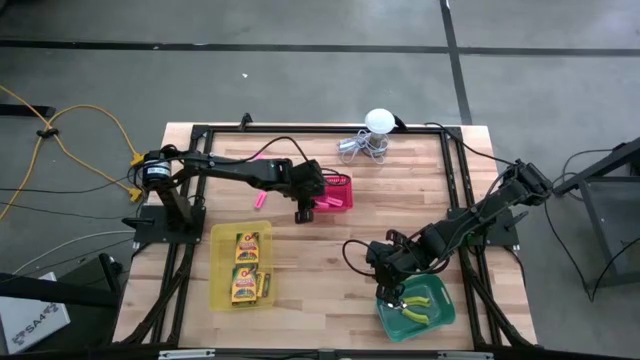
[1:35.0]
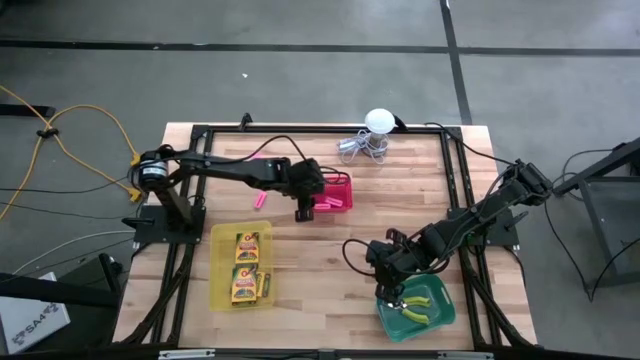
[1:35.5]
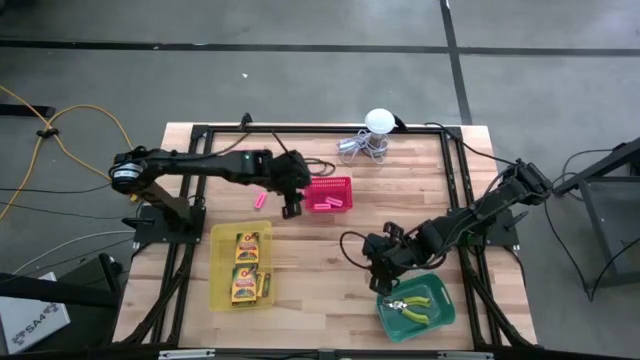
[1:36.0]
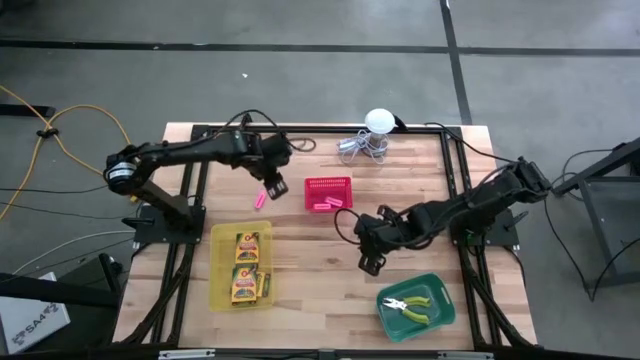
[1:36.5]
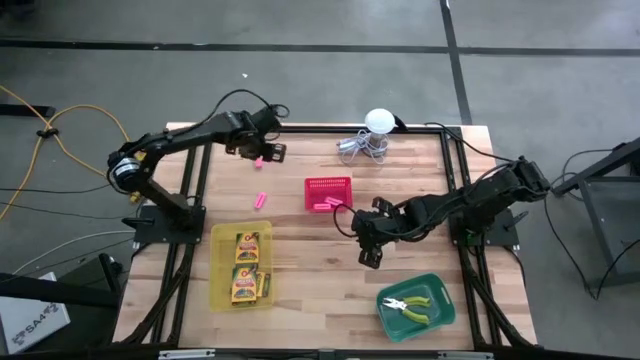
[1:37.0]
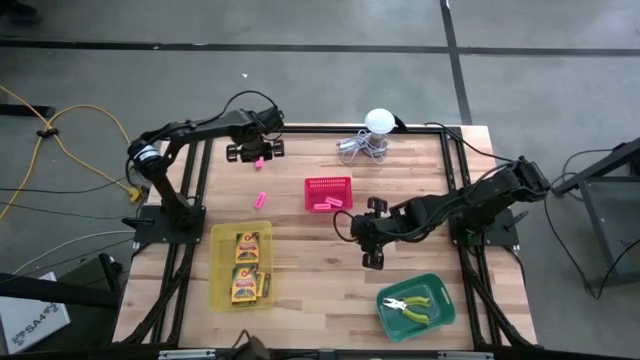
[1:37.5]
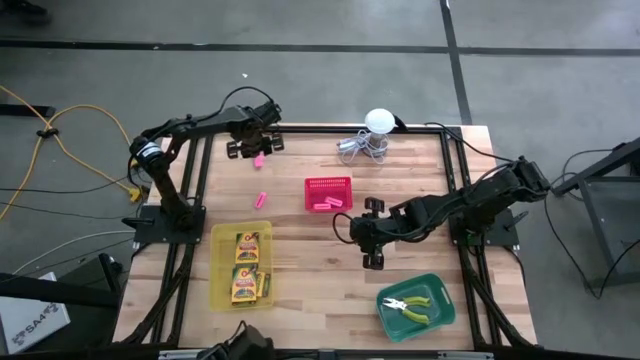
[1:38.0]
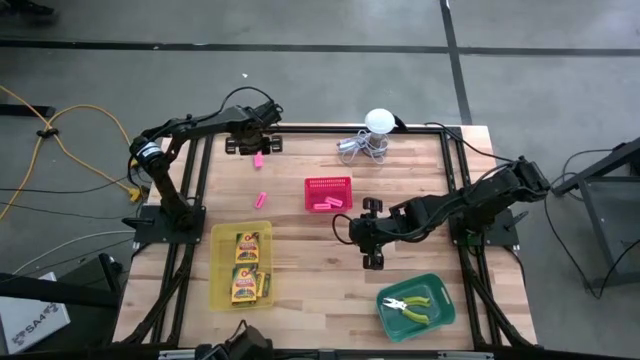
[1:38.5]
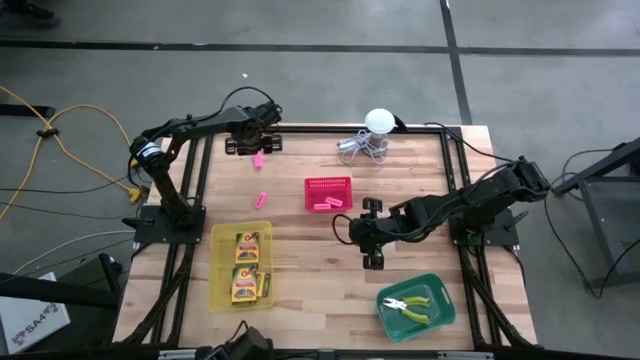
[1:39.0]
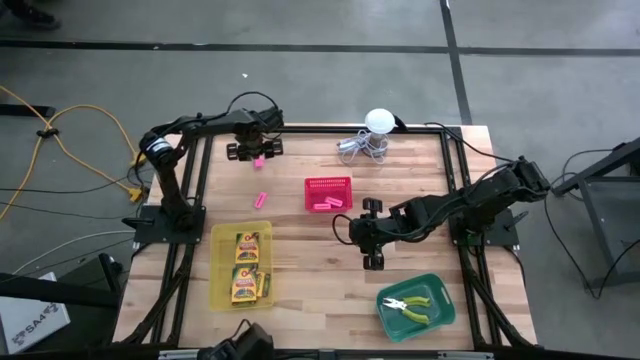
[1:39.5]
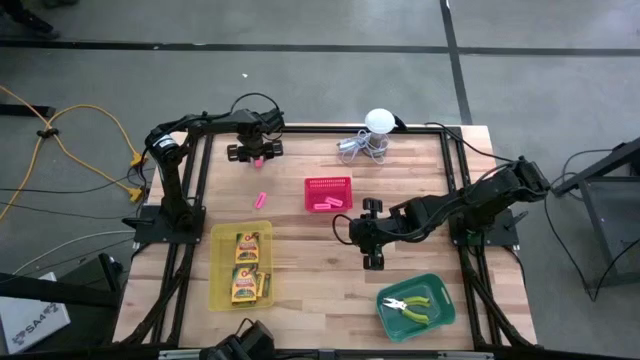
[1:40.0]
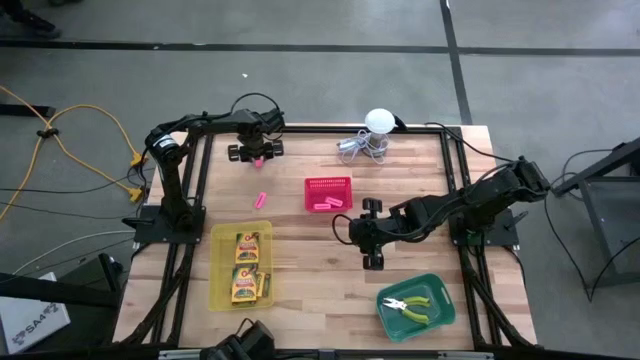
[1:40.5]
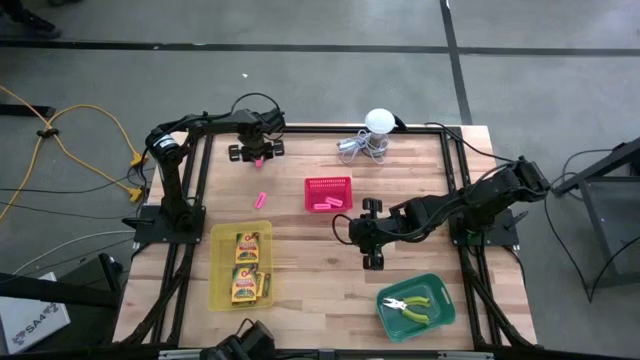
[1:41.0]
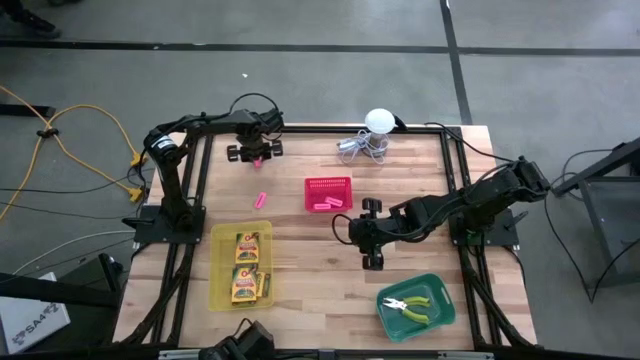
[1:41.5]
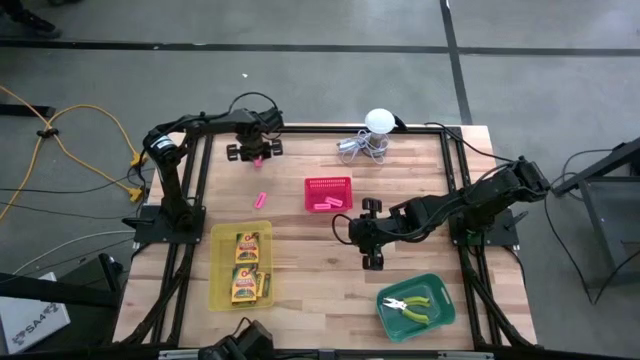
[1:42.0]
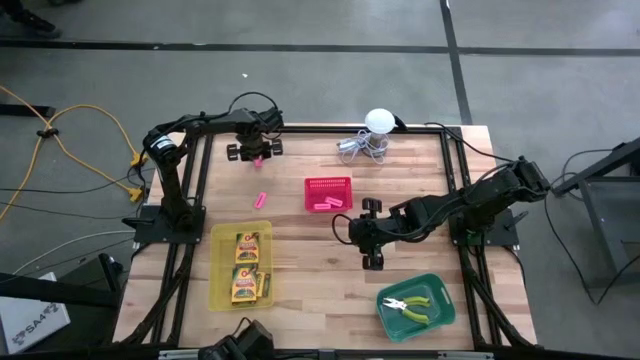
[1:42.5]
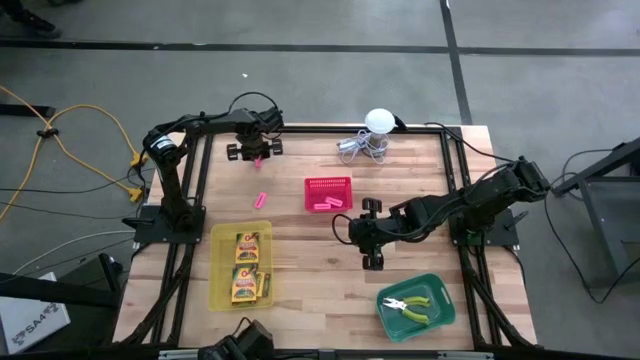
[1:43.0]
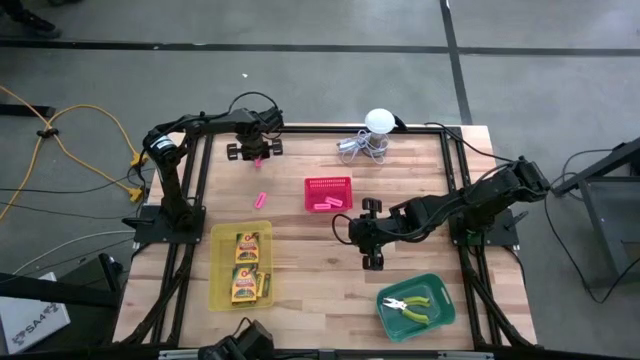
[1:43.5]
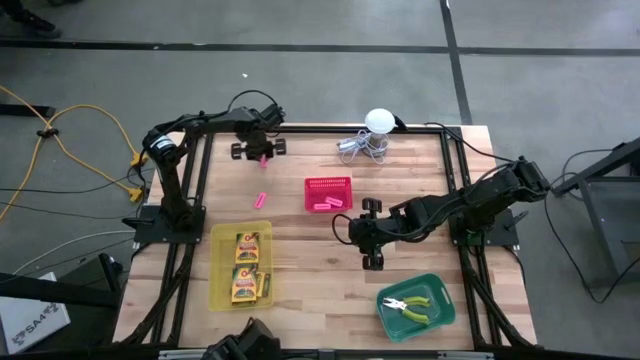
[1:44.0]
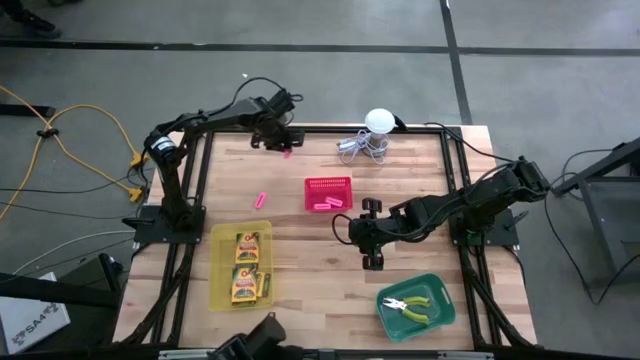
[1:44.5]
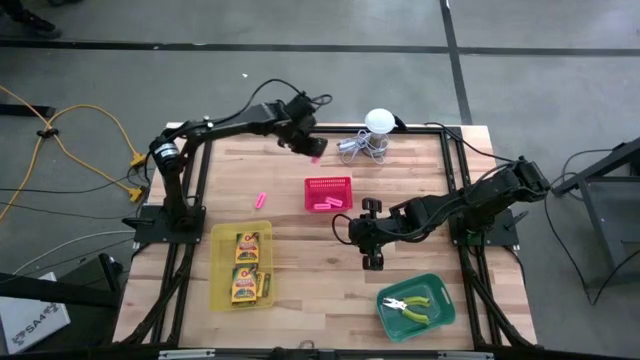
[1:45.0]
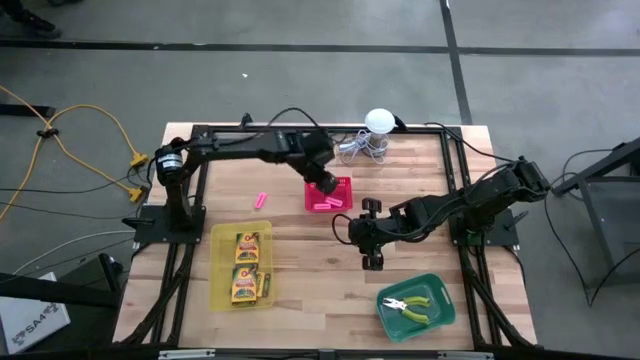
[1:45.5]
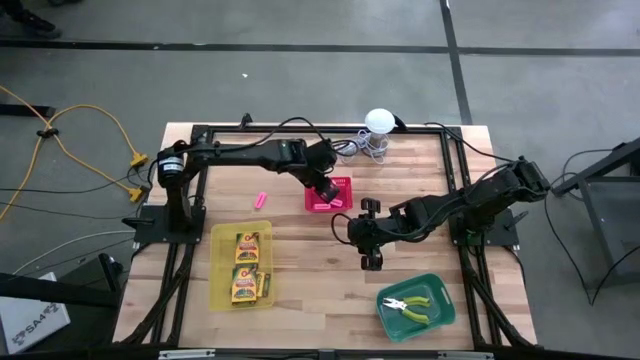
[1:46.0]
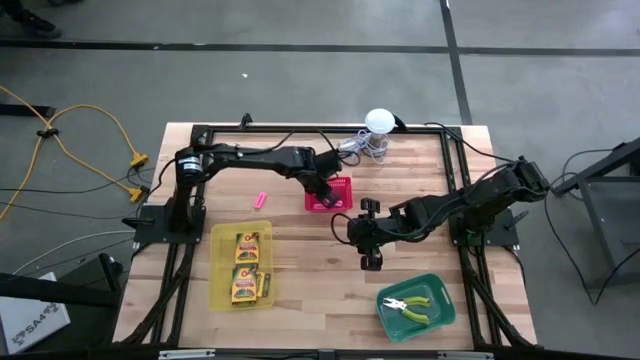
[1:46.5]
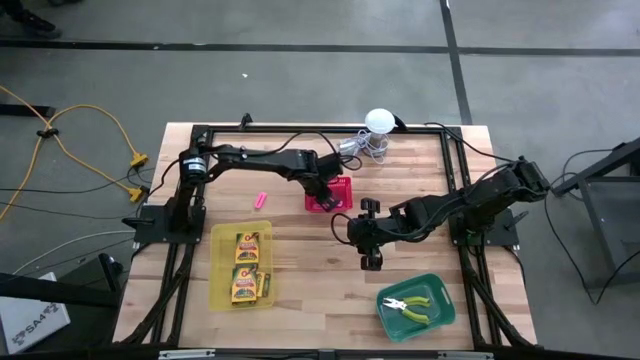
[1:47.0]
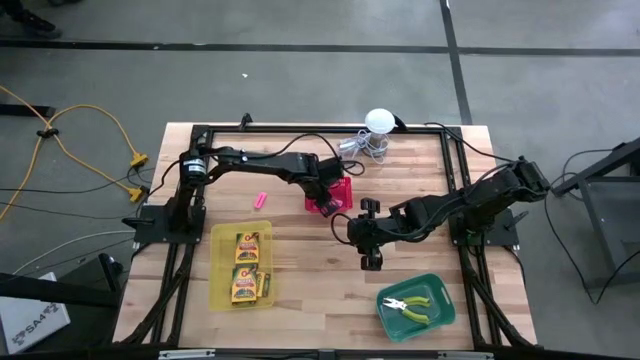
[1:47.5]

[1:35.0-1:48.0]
Task: Pick & Place School Supplies
Put the pink eraser into the red bin

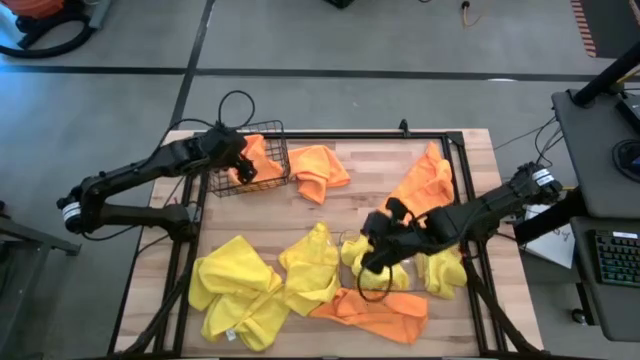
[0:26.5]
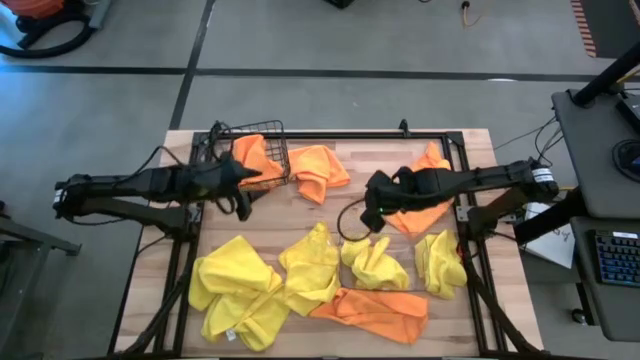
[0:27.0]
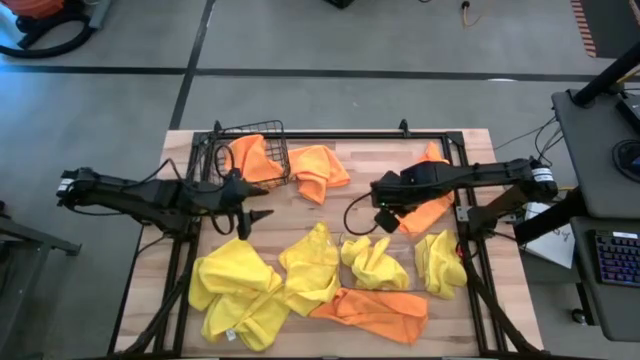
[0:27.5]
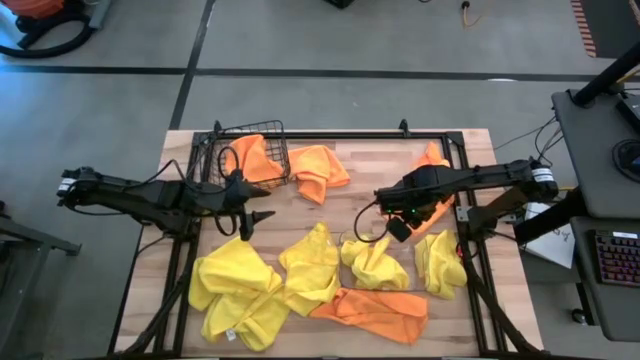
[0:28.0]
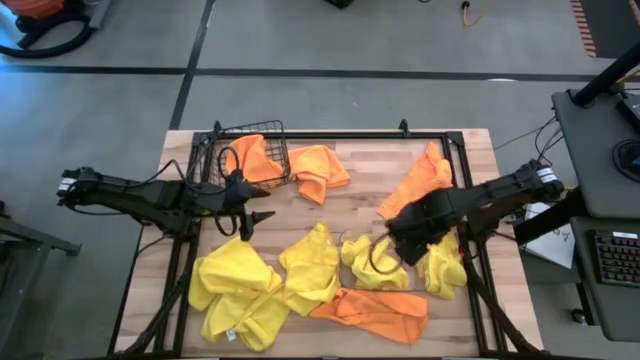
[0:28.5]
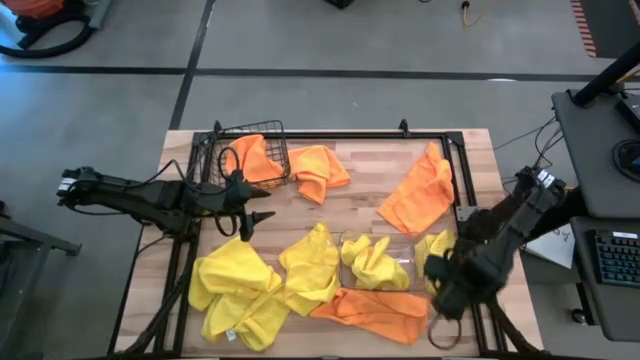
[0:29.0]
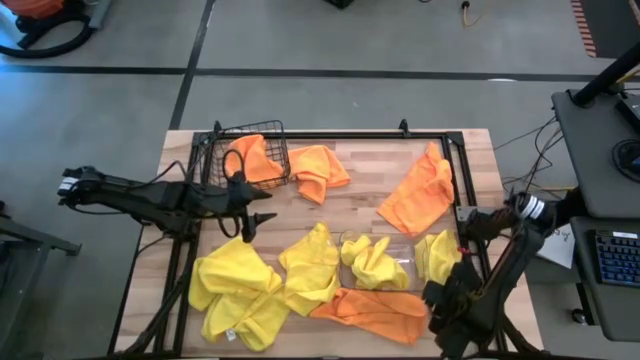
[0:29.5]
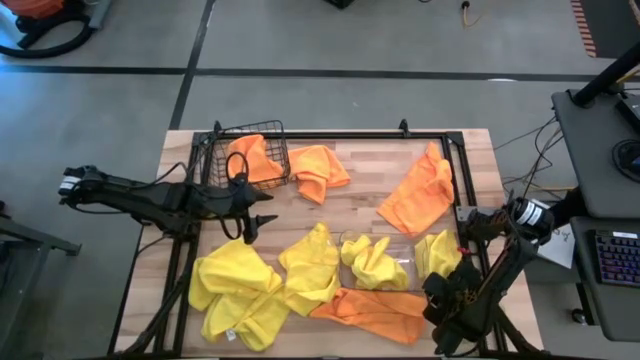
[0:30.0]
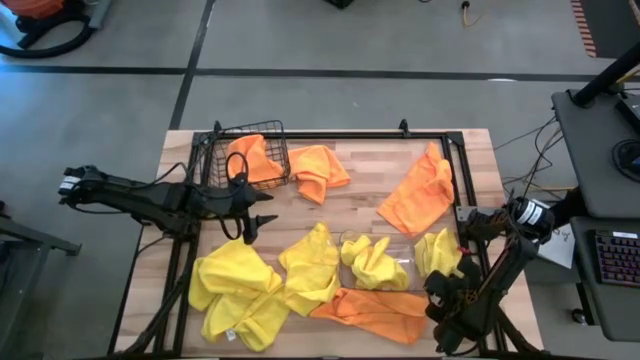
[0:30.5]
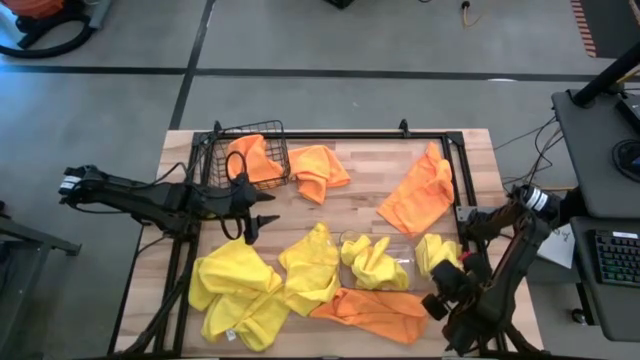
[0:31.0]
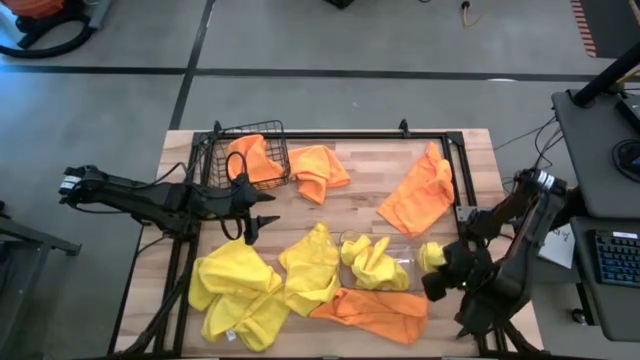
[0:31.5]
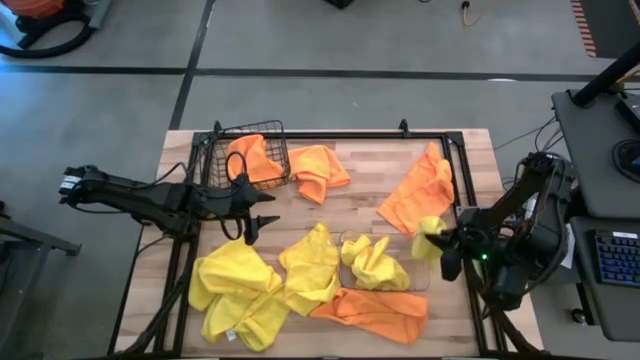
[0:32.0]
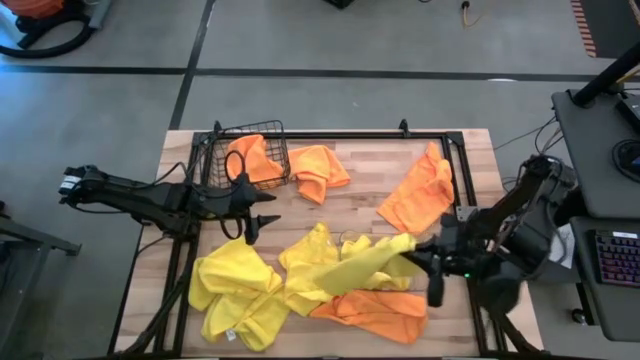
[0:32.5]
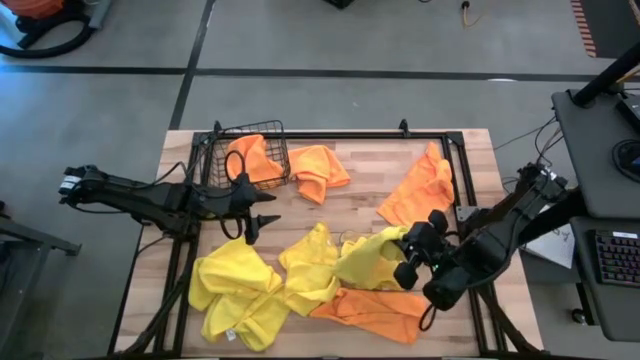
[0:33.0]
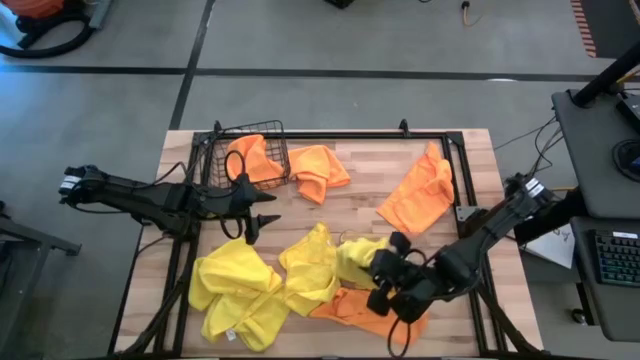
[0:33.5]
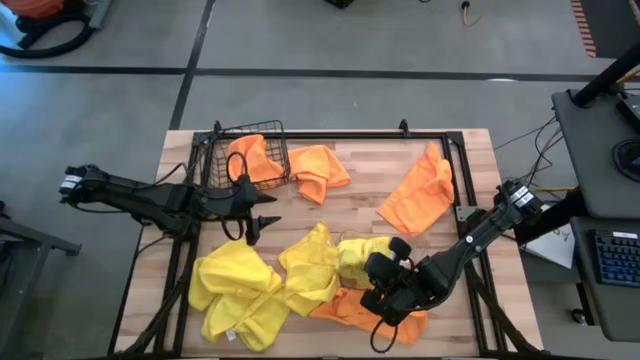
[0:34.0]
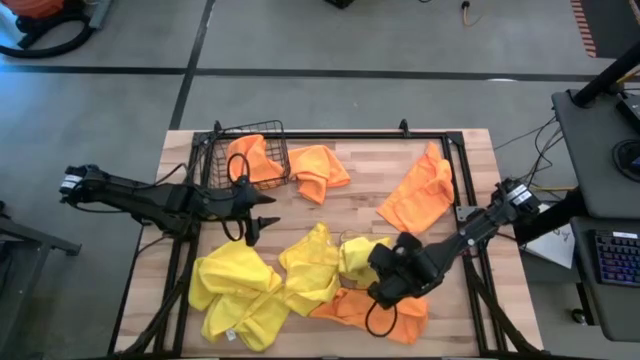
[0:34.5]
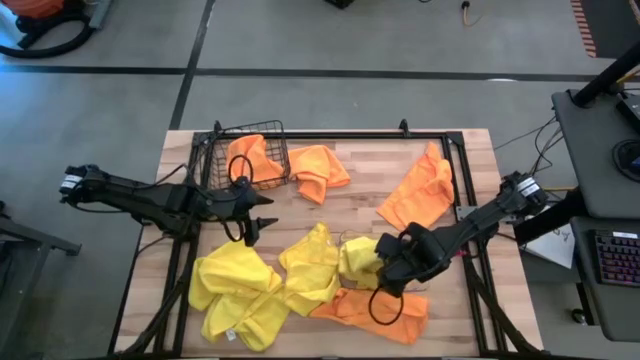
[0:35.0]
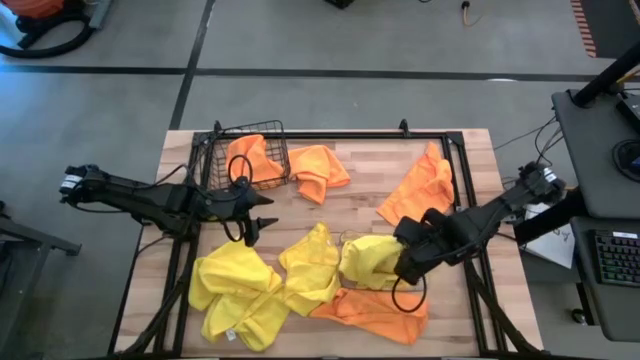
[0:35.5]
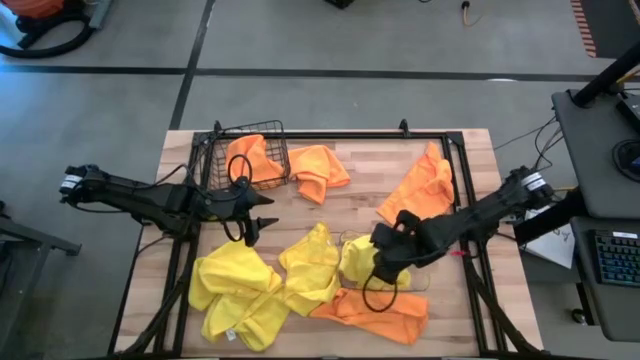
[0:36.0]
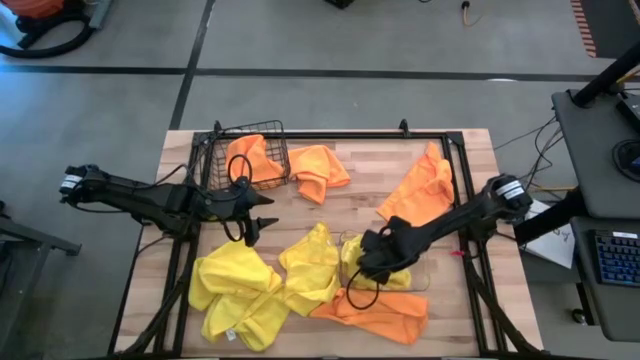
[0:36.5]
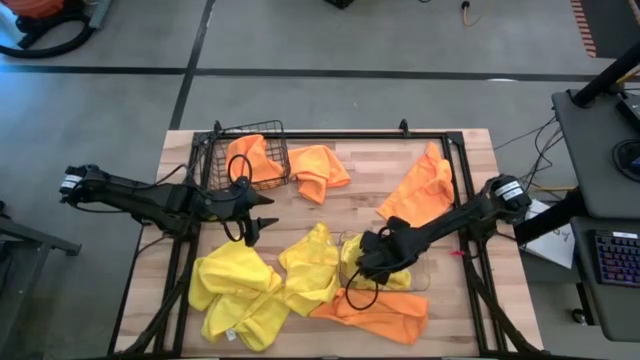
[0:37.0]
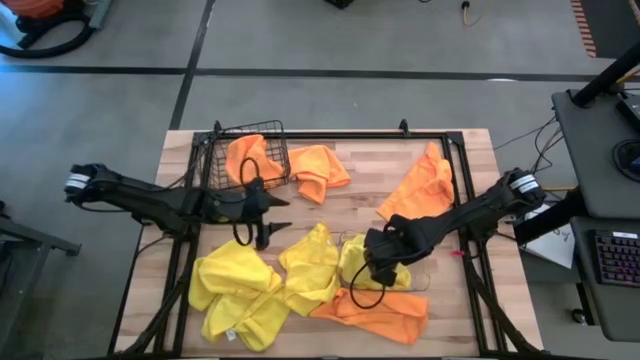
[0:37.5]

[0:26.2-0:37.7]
Task: Sort microfiber towel by color & place in baskets
Put the yellow towel into the transparent bin
